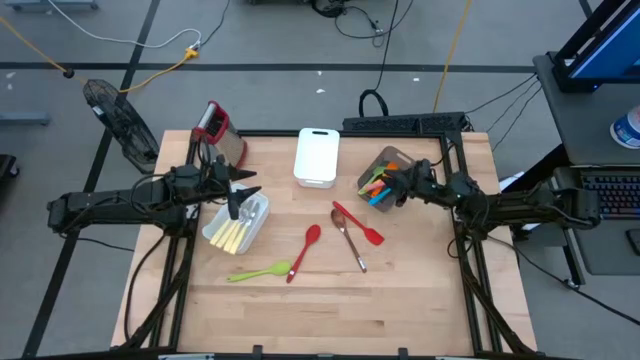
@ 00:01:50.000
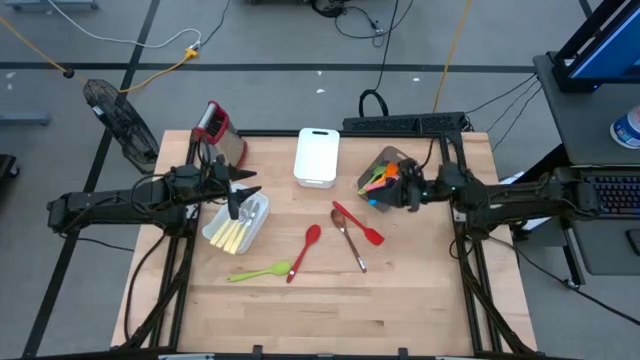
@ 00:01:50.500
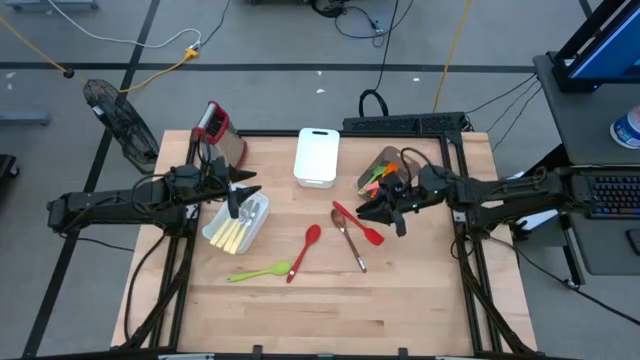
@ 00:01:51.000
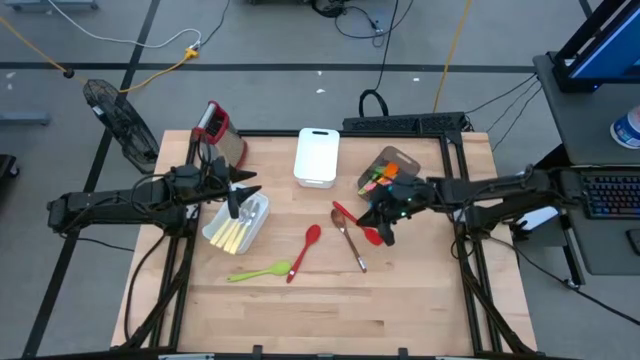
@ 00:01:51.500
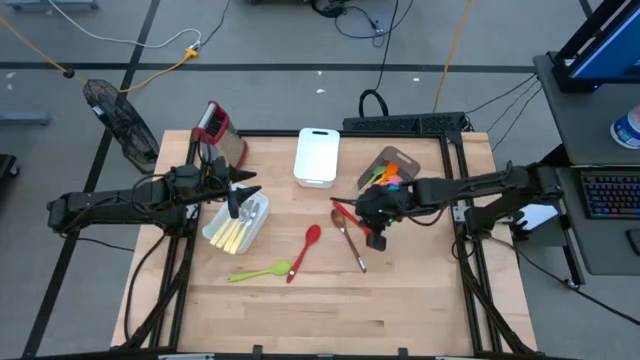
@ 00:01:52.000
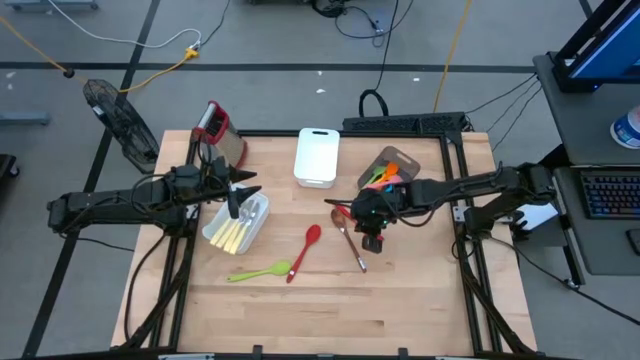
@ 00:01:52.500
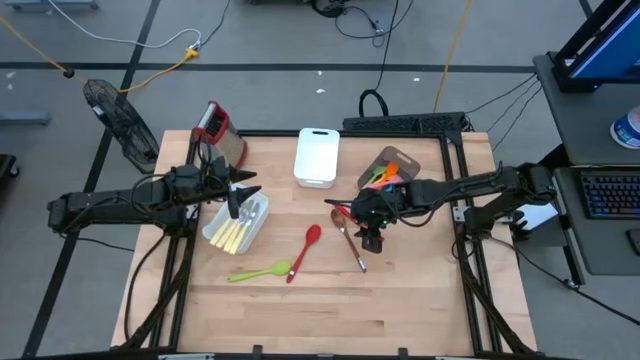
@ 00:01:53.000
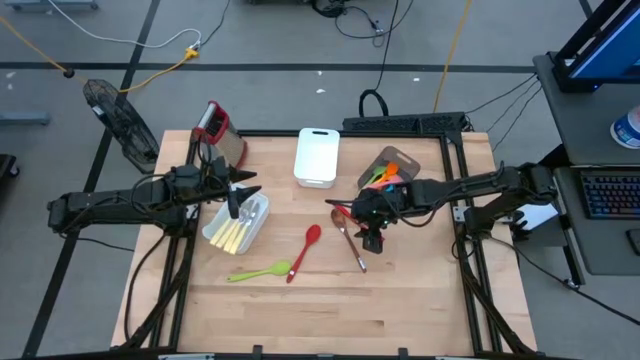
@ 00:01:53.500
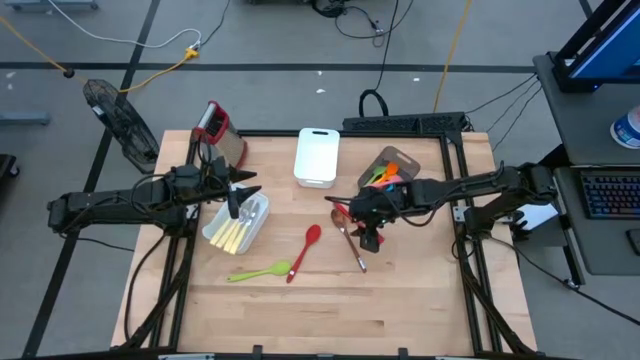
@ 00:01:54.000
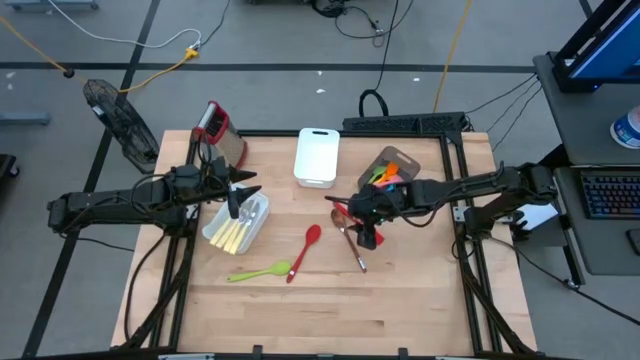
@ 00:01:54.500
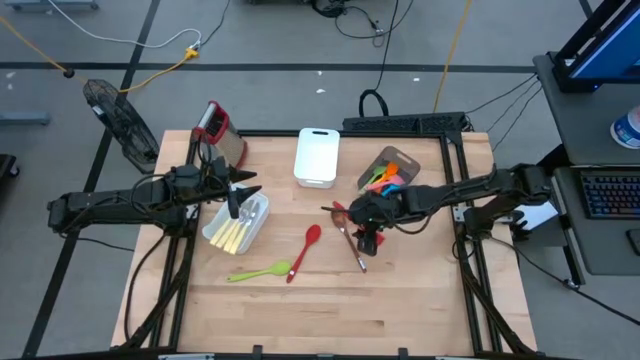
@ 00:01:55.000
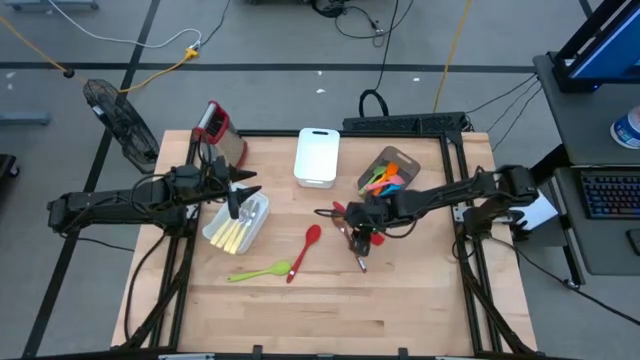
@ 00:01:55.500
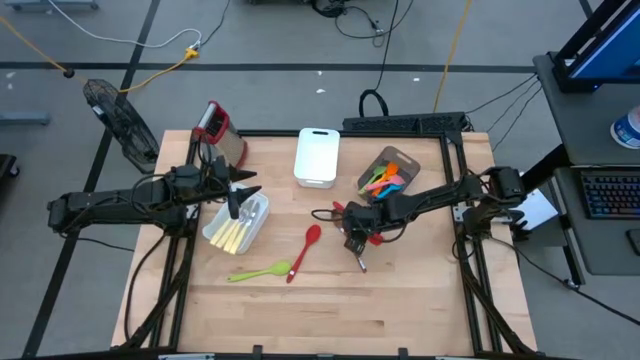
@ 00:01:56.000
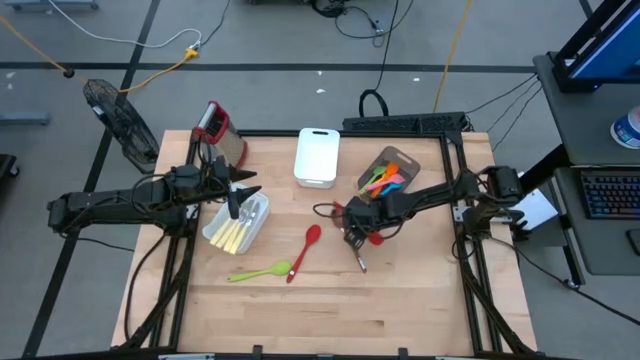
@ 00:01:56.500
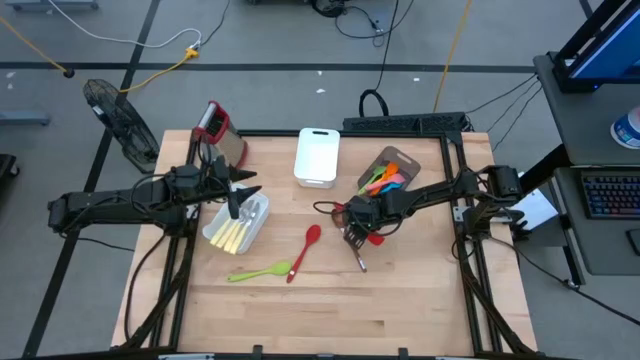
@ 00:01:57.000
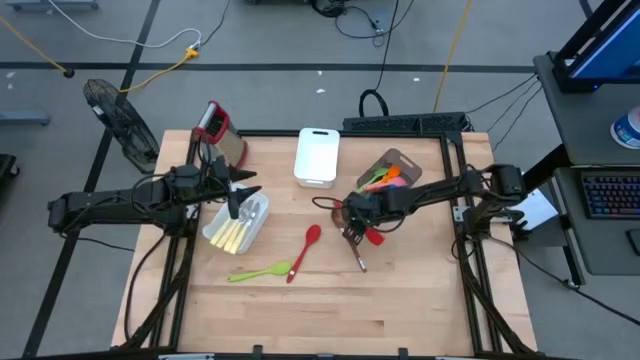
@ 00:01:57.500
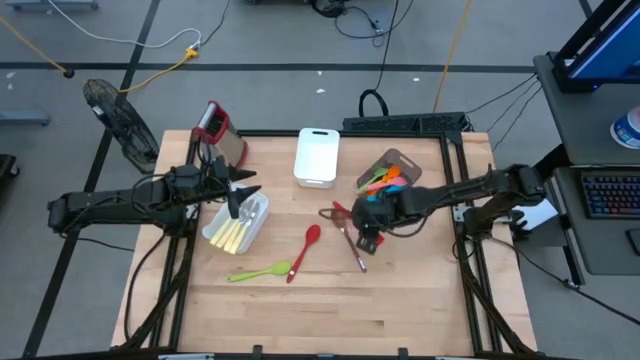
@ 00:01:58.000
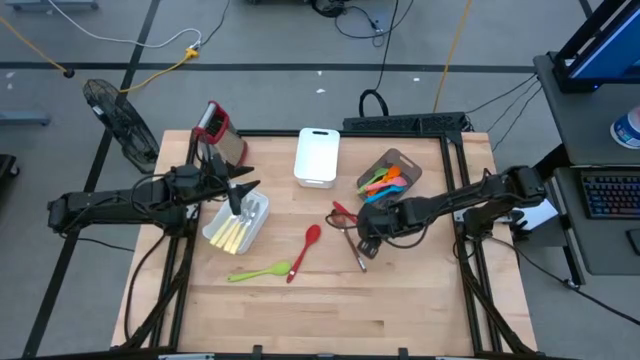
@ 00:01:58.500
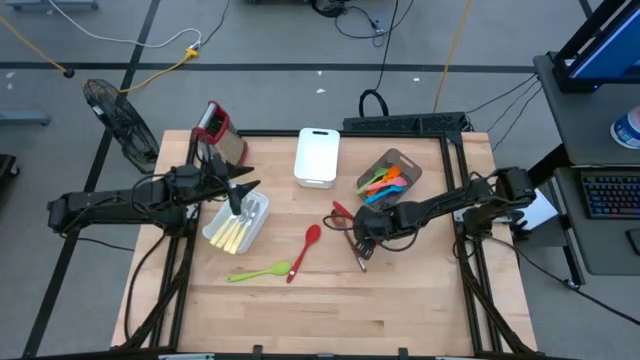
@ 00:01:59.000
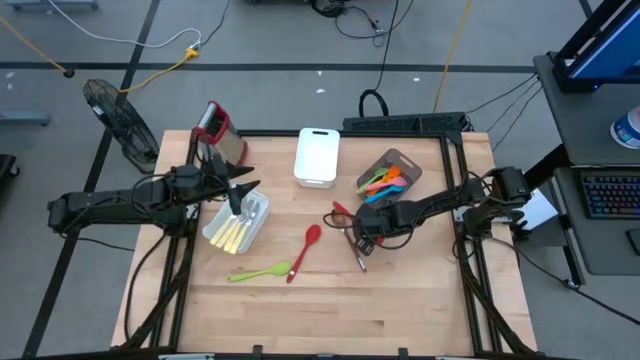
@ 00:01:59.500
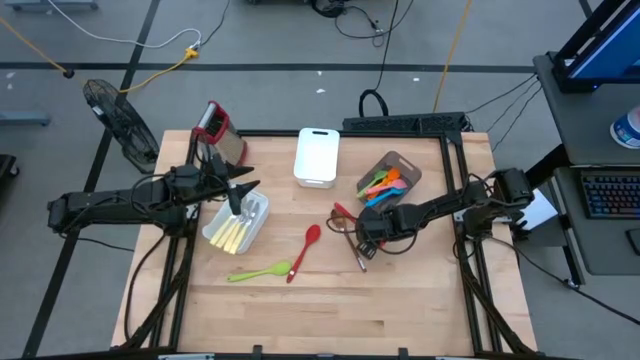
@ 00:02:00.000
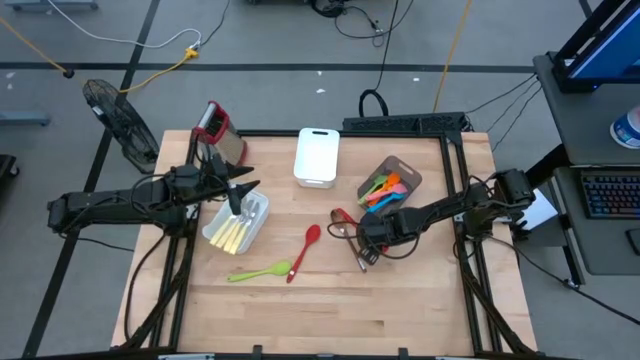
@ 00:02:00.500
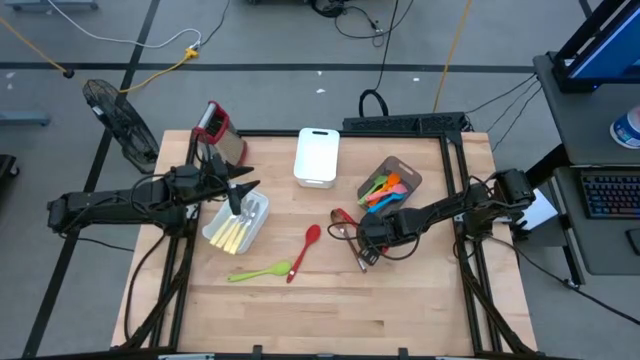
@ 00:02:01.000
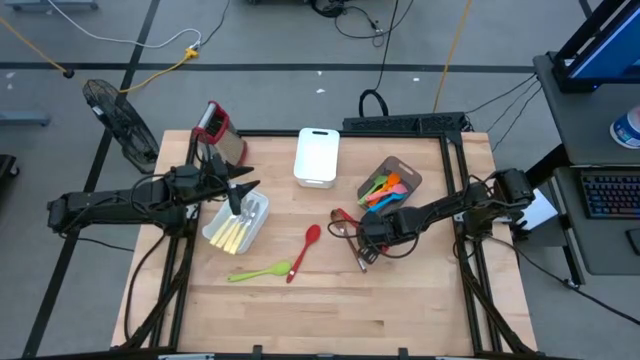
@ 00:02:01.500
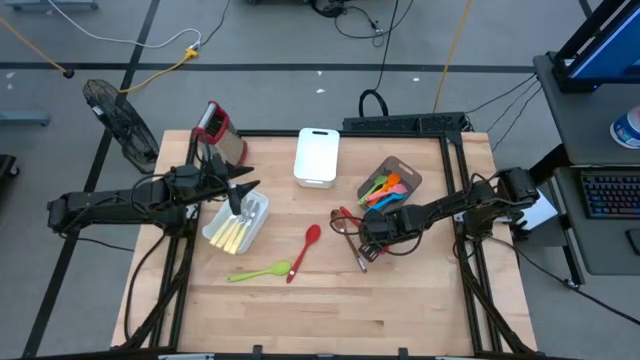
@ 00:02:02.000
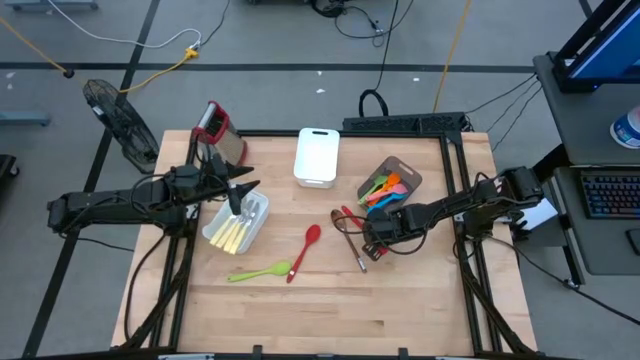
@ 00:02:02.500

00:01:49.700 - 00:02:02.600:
Task: Pick & Place Kitchen Items
Put the red spatula into the black bin

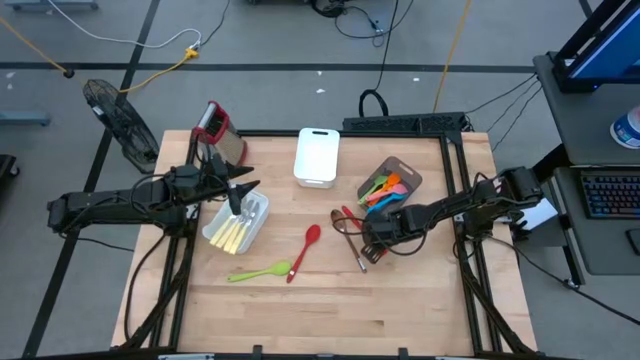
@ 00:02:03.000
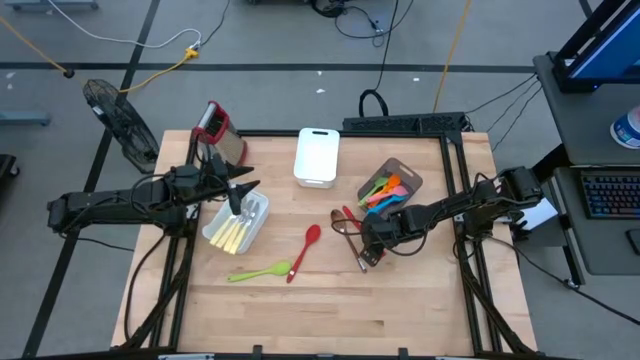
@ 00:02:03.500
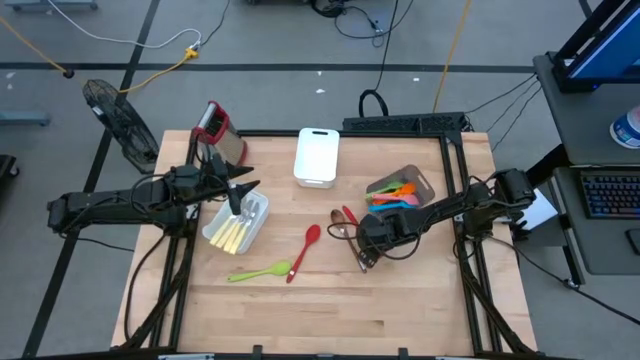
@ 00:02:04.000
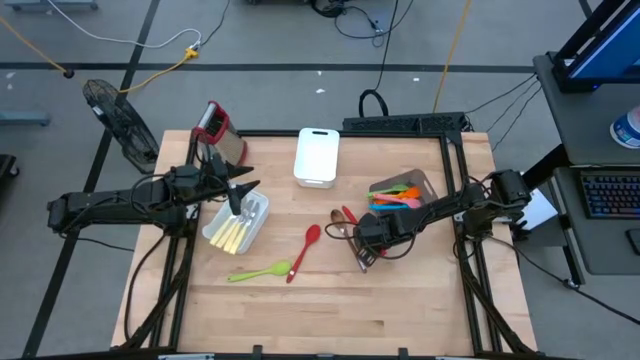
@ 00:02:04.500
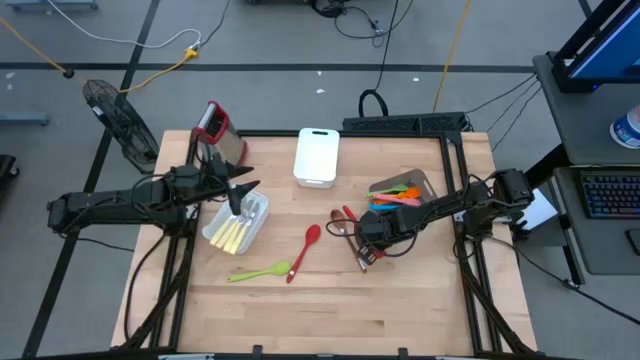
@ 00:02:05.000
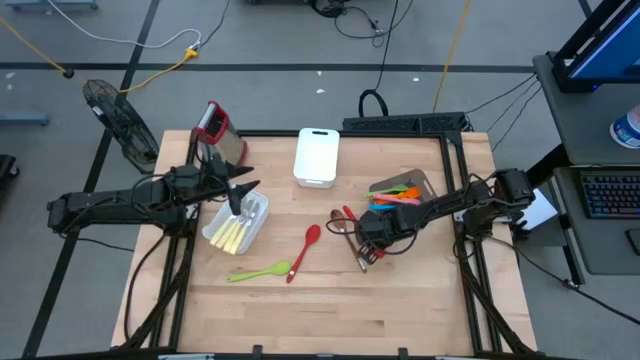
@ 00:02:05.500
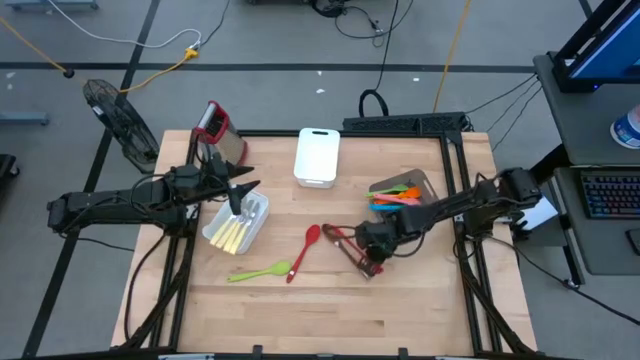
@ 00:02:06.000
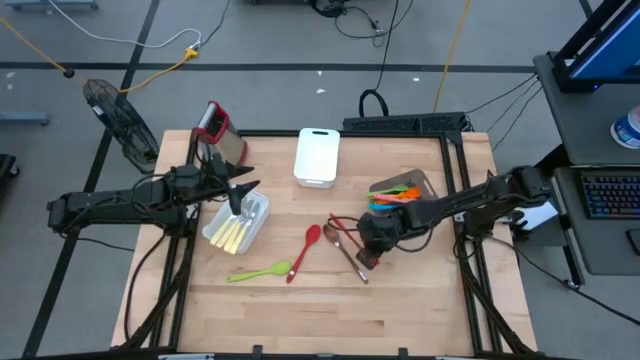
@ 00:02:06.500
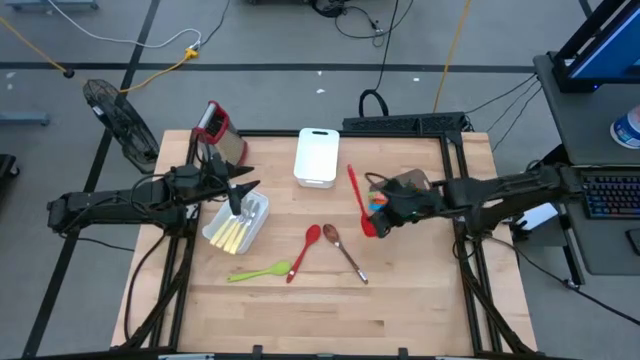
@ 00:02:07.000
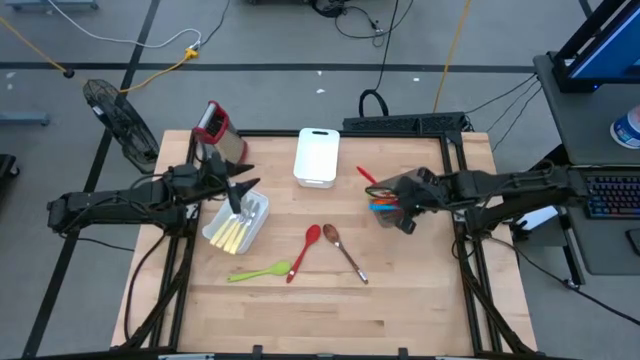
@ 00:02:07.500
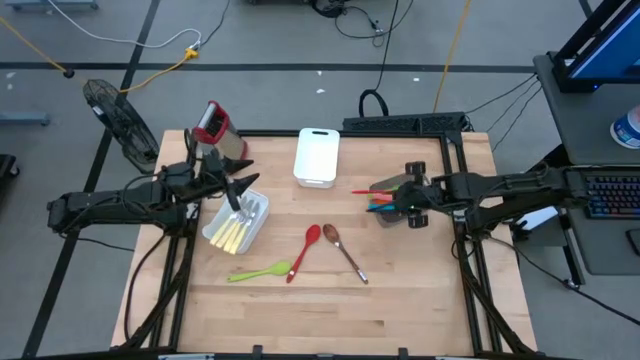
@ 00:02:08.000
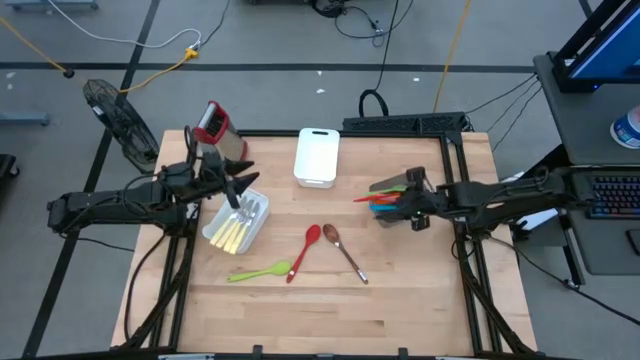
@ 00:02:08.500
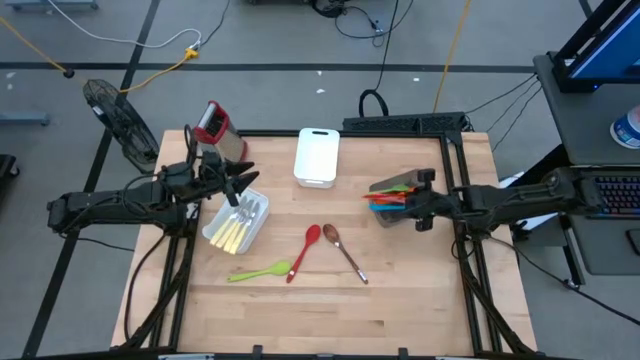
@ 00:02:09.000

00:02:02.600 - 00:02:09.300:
Put the red spatula into the black bin

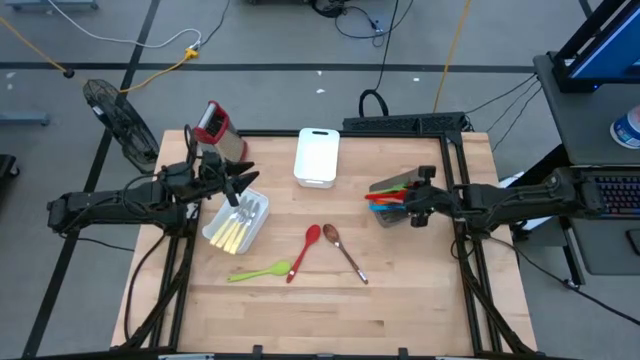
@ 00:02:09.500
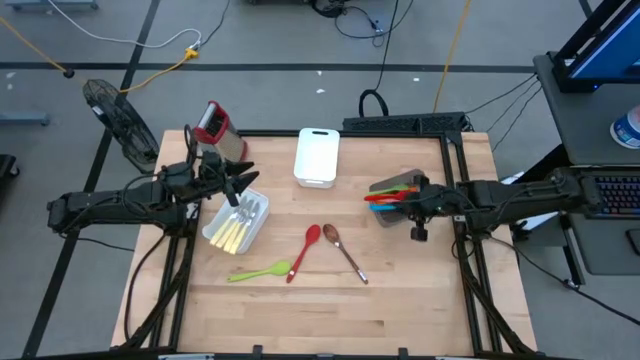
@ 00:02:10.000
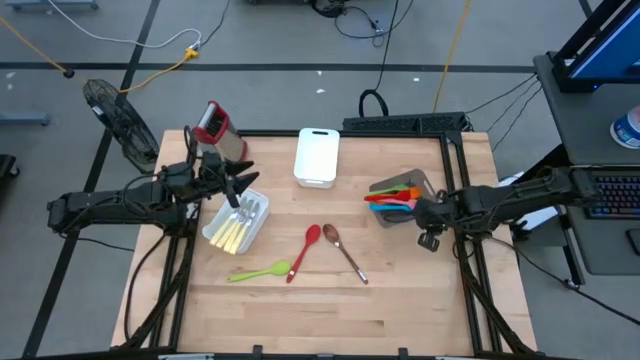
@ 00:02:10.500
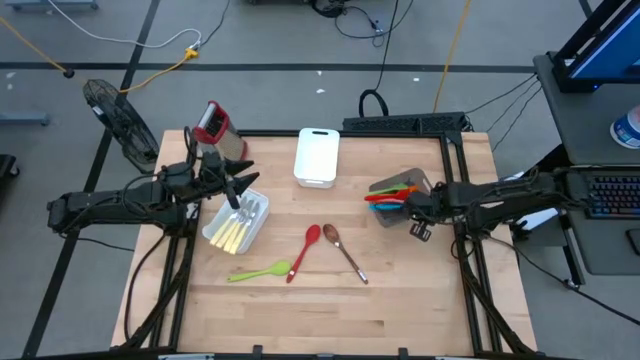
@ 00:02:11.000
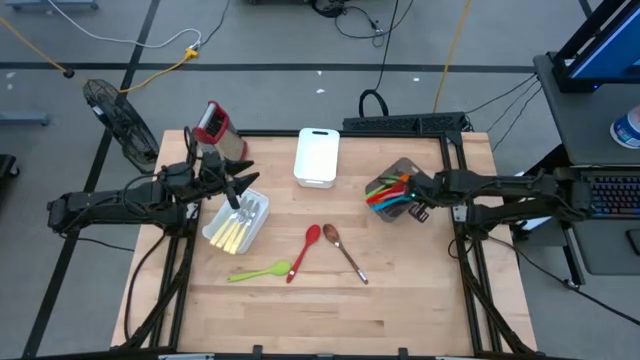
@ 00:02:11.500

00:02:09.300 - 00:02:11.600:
Adjust the black bin
